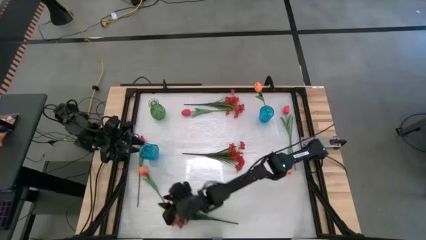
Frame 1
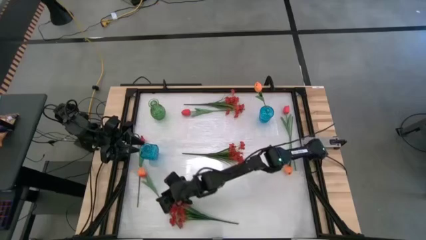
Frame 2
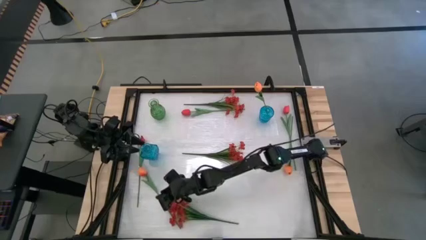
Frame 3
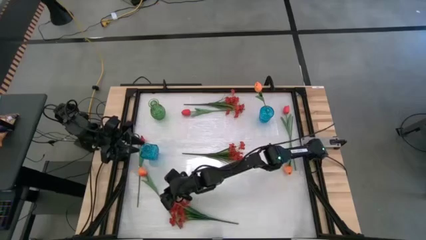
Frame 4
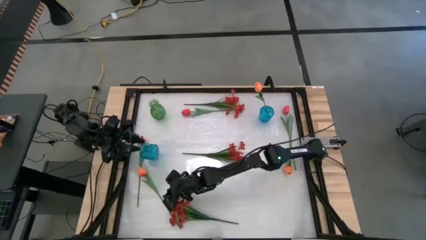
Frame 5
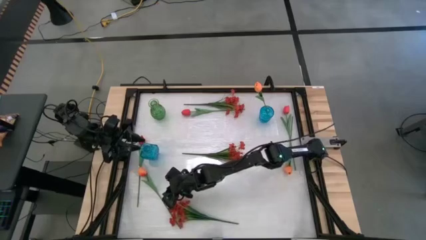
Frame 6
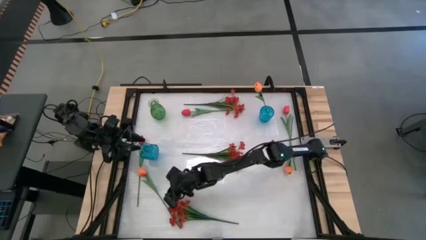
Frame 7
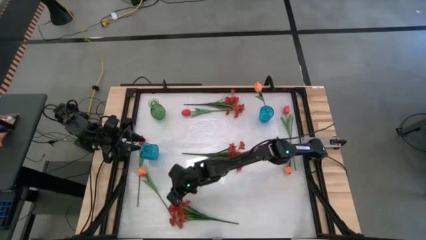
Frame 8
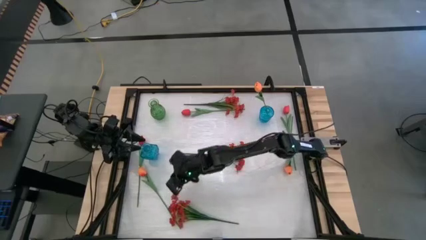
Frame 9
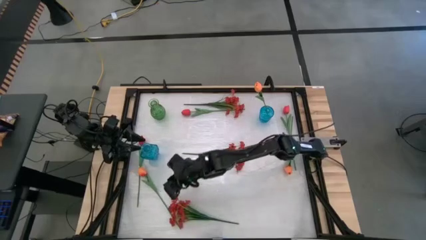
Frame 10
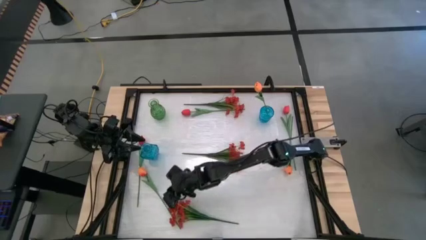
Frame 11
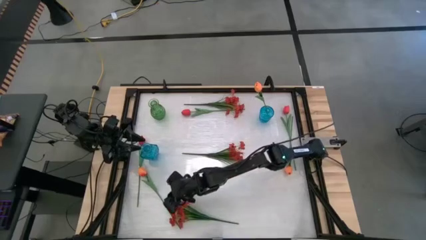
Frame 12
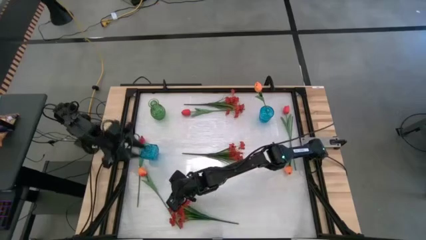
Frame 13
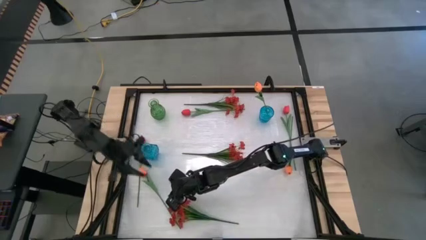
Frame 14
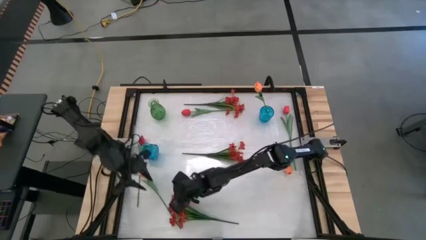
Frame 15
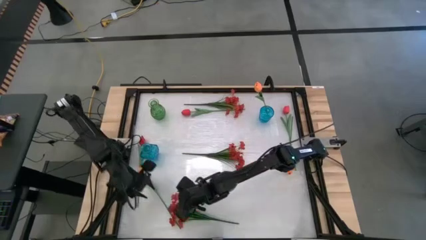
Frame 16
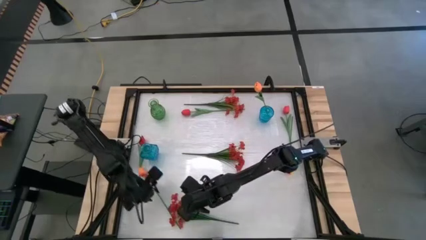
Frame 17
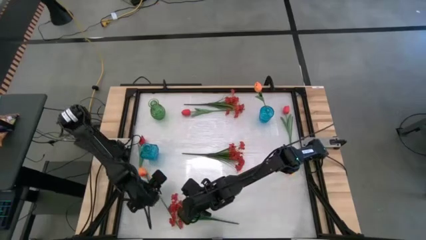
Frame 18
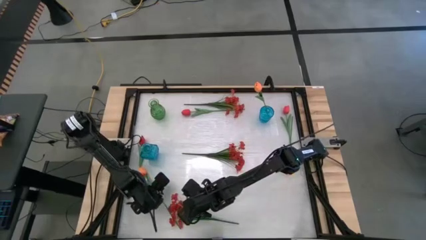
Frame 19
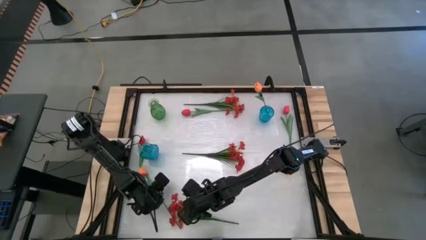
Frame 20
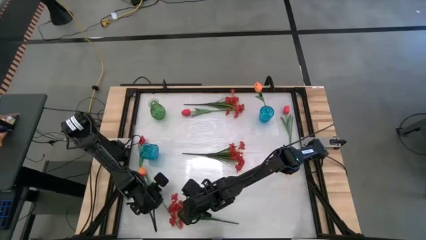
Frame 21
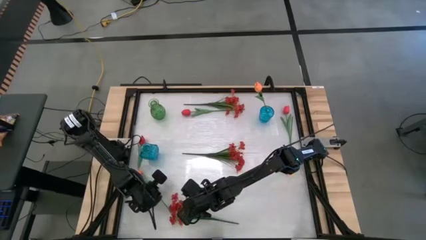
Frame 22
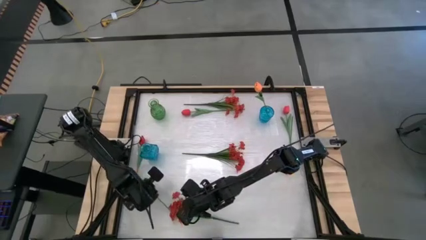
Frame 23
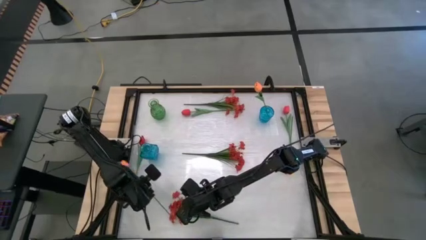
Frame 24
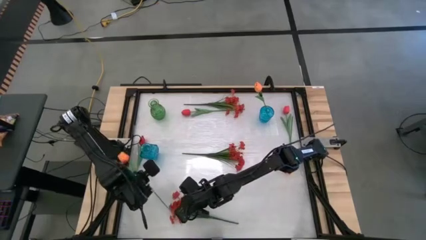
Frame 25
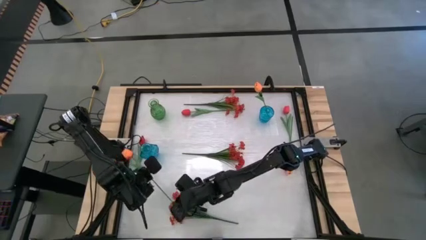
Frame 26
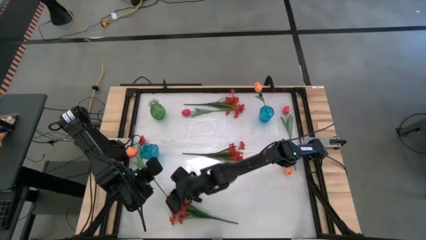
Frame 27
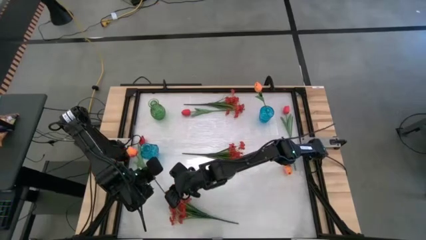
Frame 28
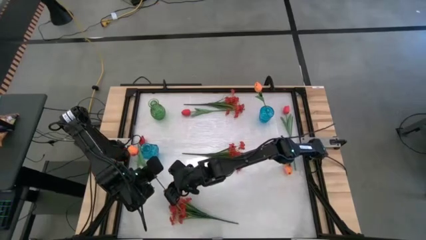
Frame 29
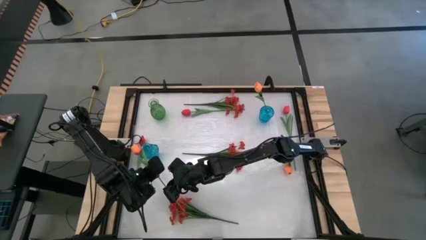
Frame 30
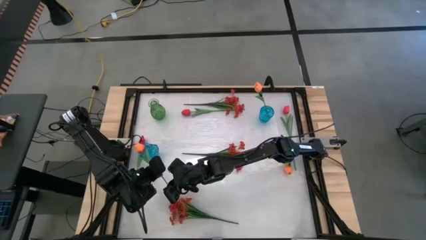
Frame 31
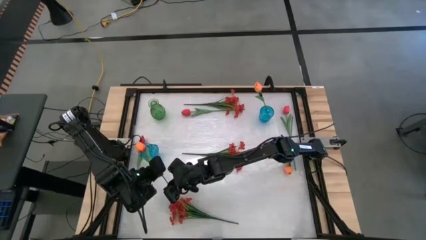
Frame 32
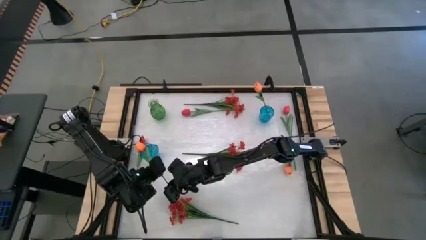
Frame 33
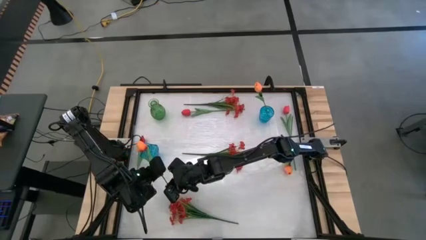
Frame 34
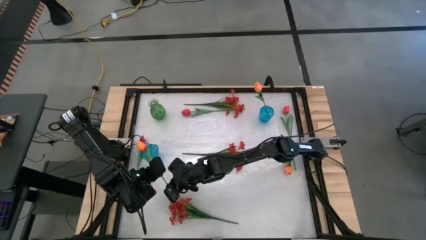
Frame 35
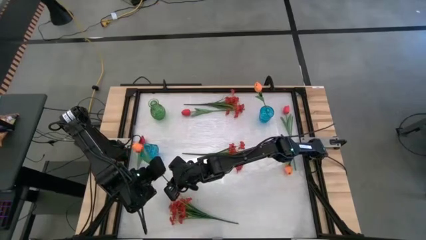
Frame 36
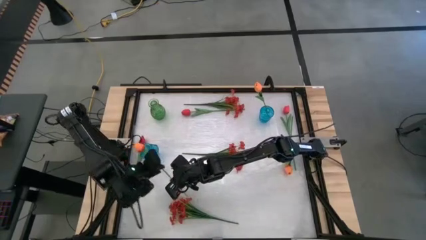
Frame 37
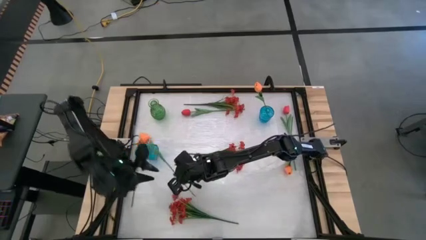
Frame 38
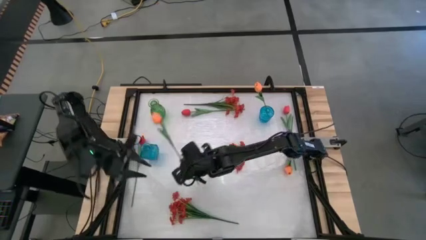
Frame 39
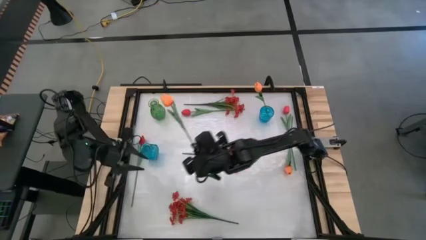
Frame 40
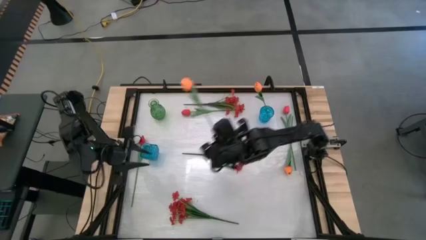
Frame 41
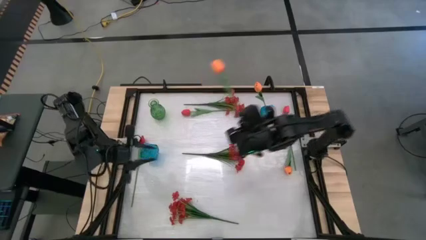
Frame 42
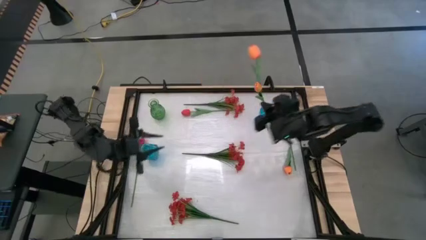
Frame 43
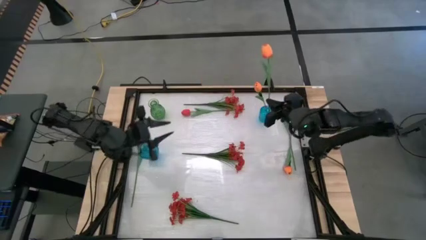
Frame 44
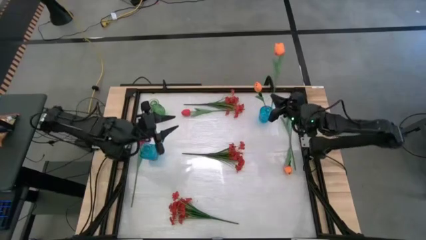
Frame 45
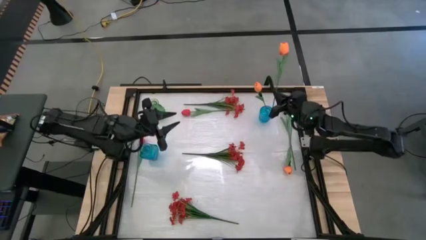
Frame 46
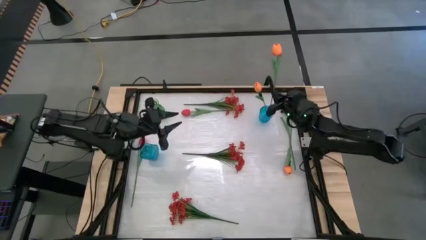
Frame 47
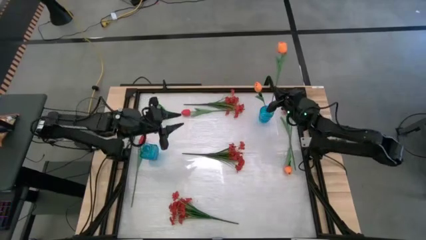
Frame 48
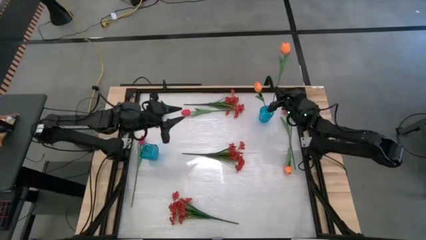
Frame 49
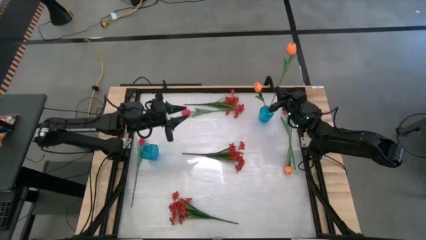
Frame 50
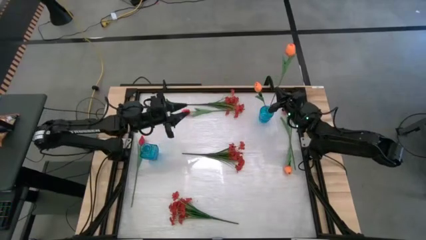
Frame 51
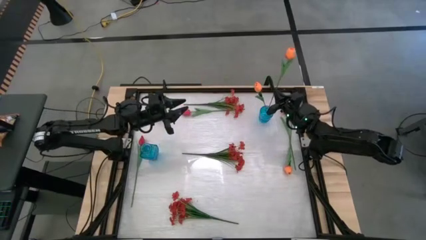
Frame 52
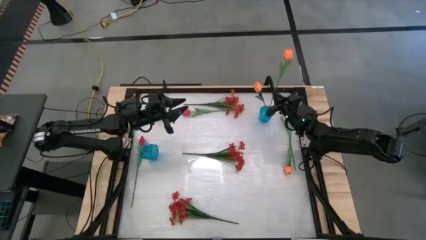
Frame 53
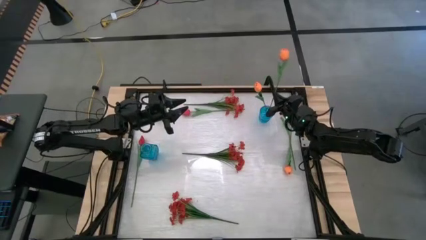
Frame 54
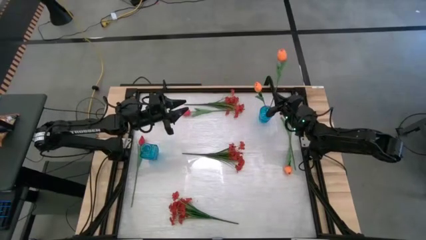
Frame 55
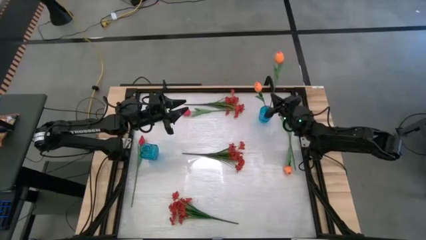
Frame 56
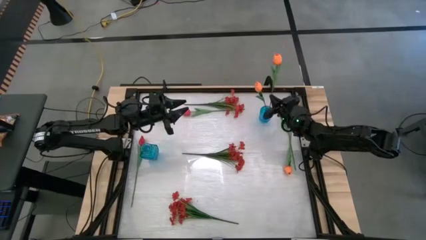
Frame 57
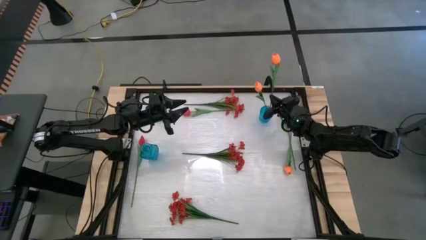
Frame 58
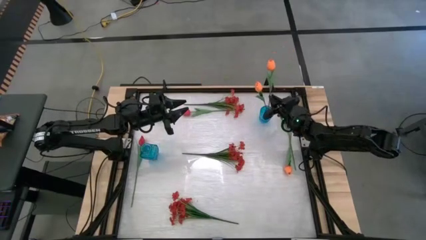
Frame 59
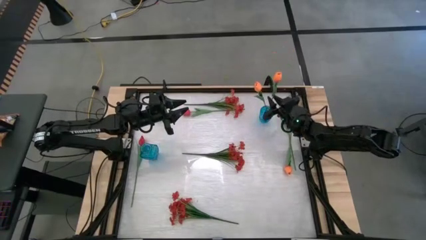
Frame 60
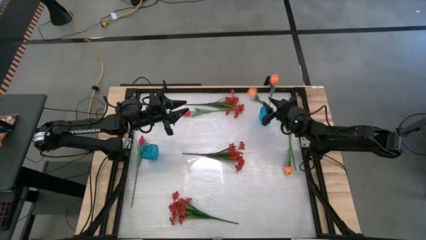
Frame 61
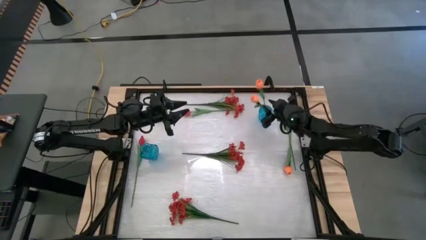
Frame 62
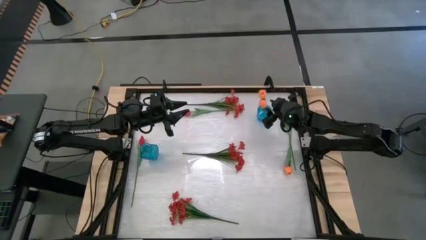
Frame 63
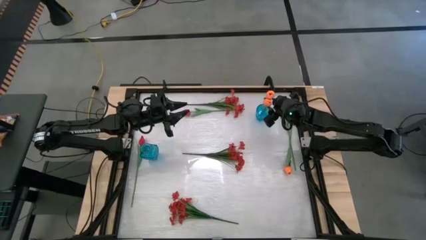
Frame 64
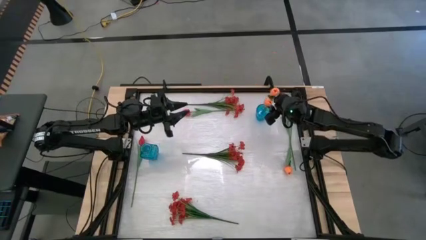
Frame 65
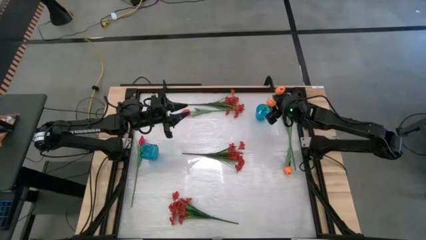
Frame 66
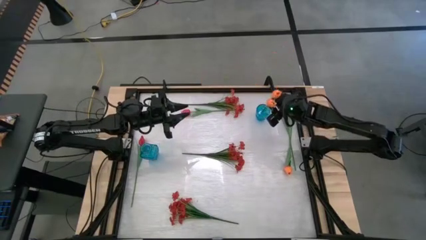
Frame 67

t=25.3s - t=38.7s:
Task: Sort flowers into vase by color
Put the left orange tulip into the right blue vase
